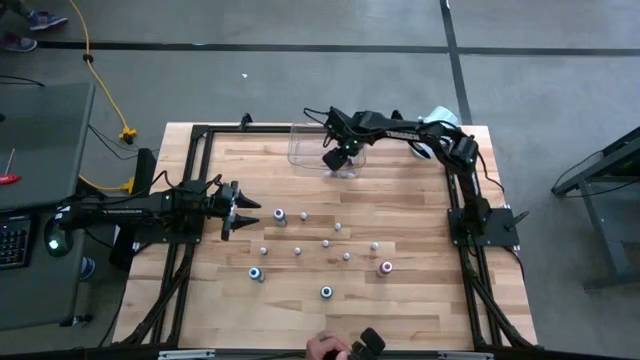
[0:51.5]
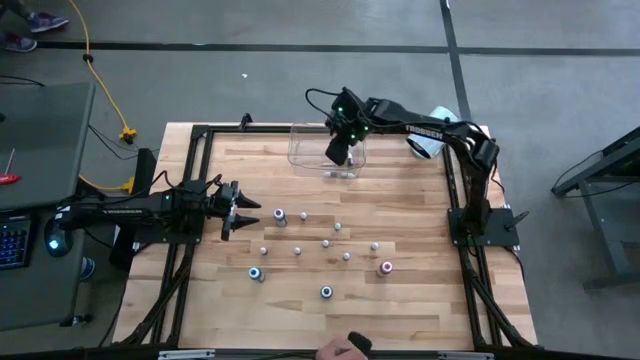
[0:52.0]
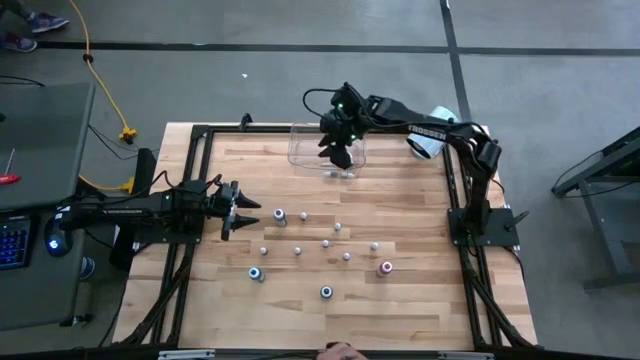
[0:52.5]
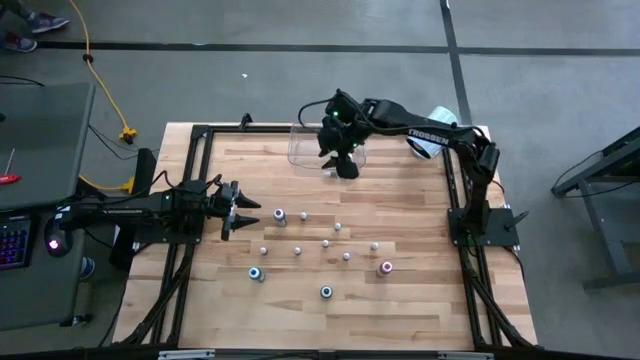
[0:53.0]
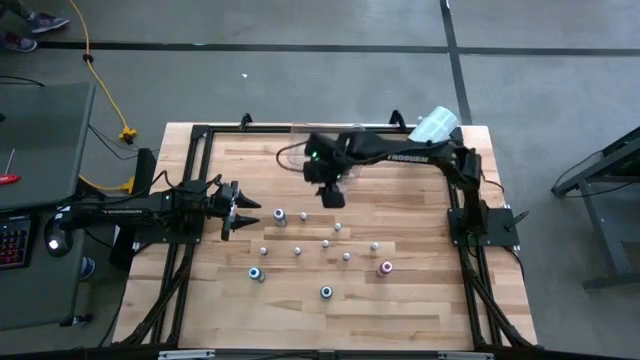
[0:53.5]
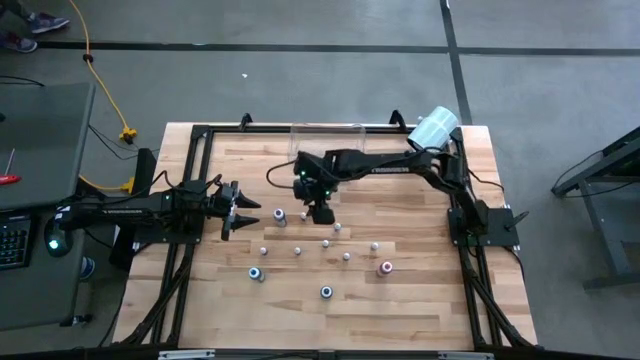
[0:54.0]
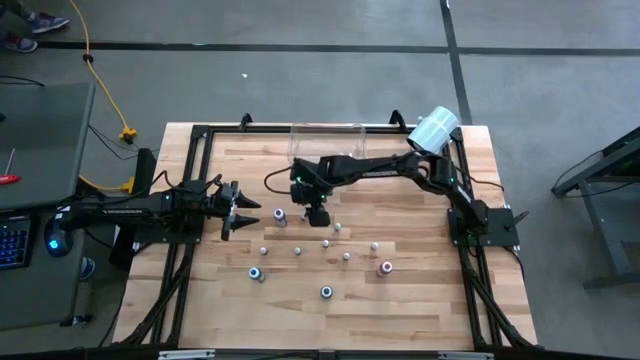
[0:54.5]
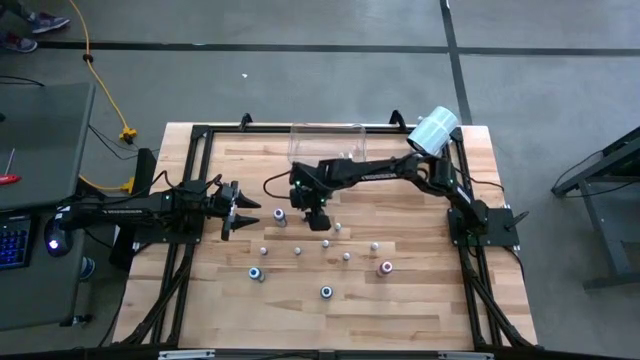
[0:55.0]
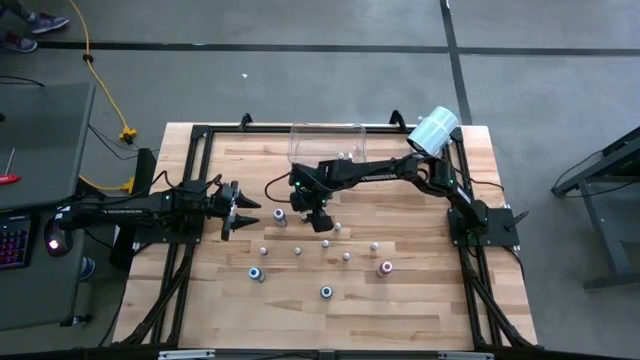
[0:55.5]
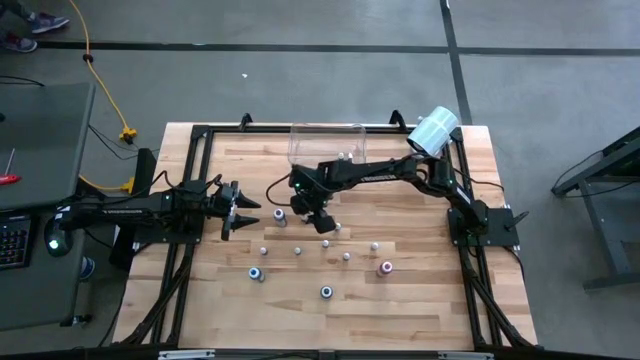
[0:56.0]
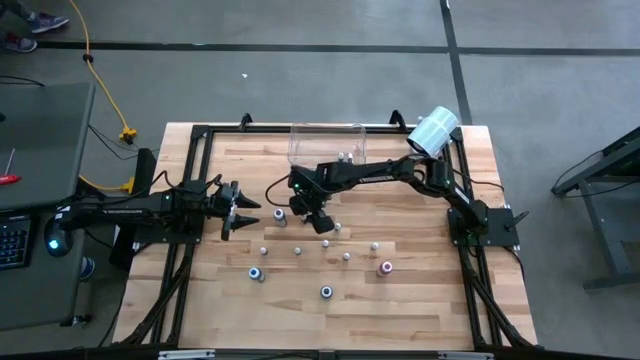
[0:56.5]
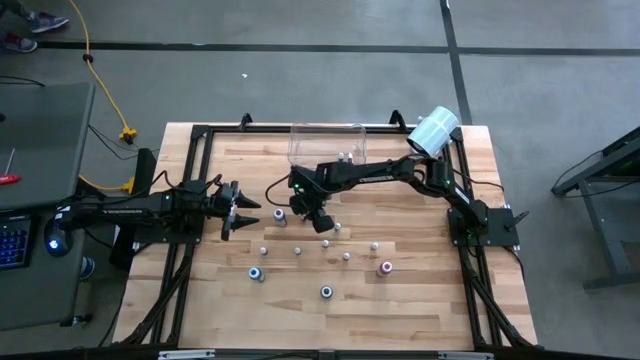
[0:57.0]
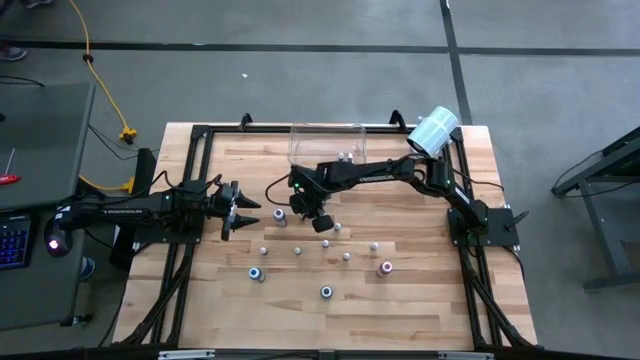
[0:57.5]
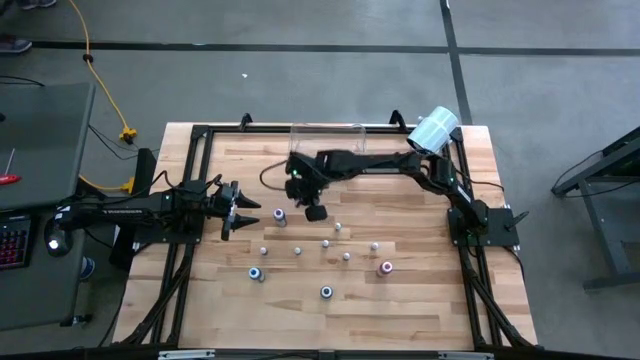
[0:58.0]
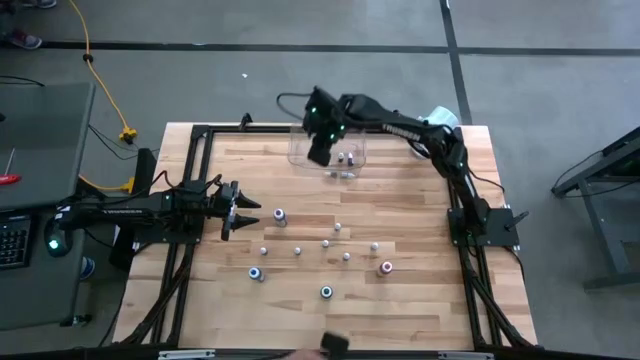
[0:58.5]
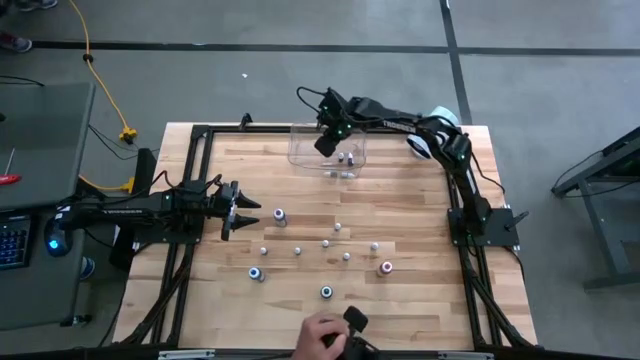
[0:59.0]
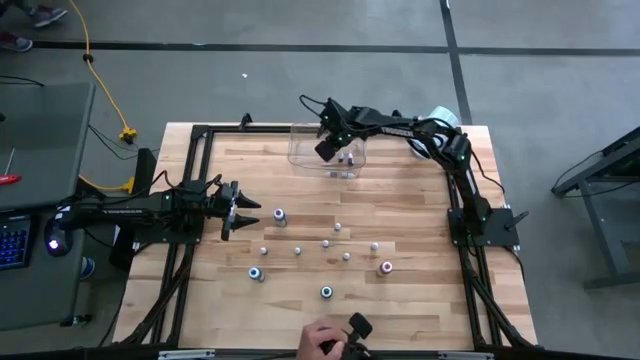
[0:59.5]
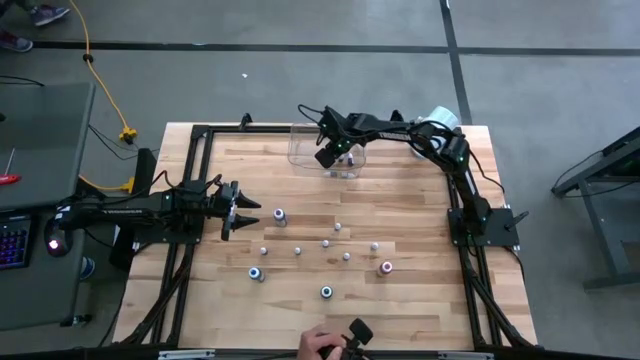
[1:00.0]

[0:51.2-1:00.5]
Task: Pick & Place food coloring
Put the small blue food coloring into the transparent container

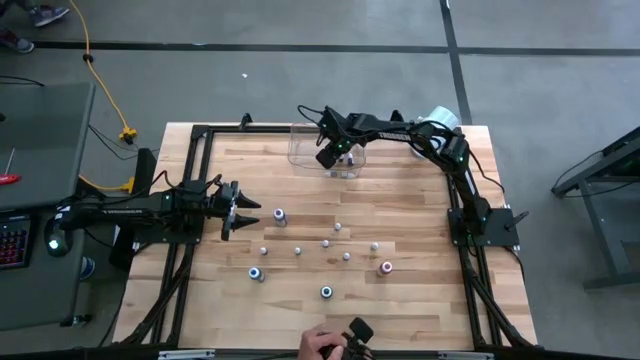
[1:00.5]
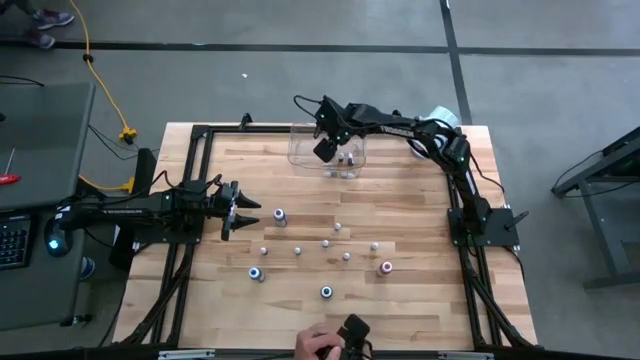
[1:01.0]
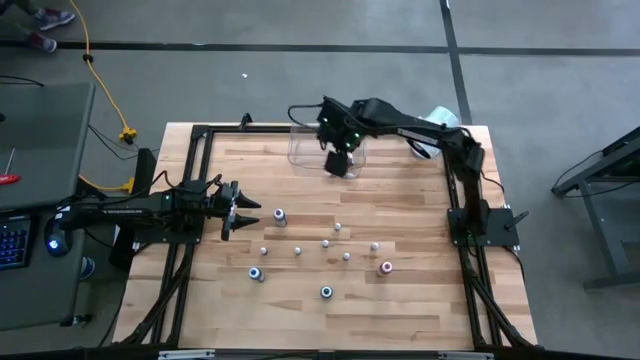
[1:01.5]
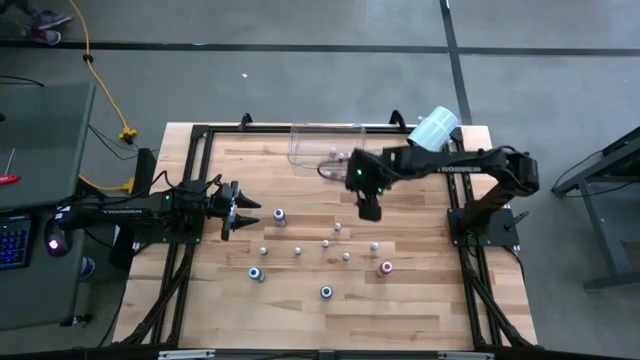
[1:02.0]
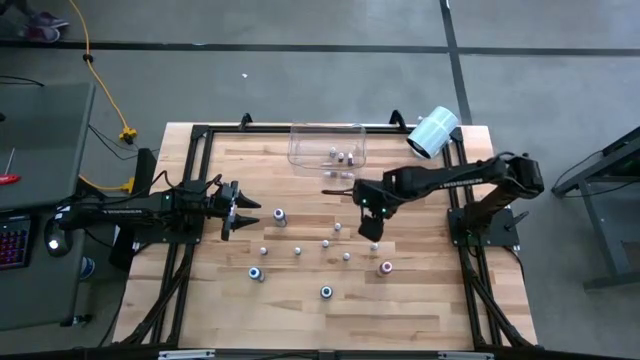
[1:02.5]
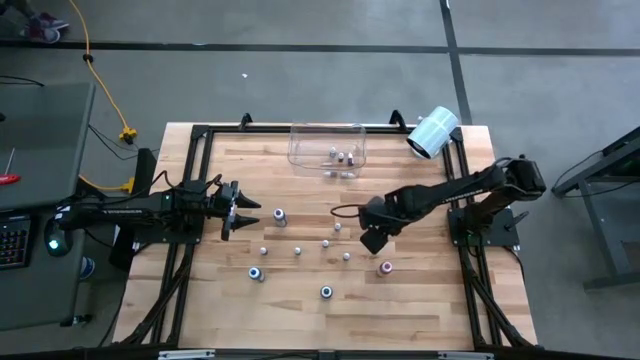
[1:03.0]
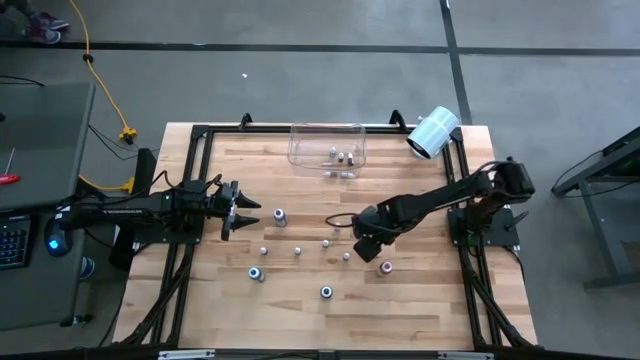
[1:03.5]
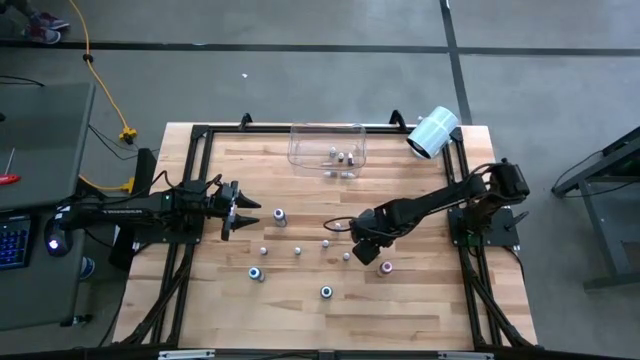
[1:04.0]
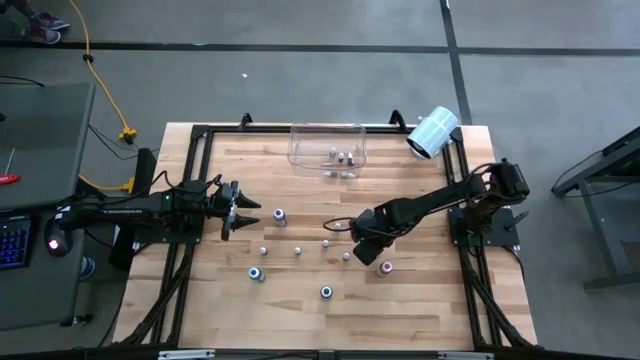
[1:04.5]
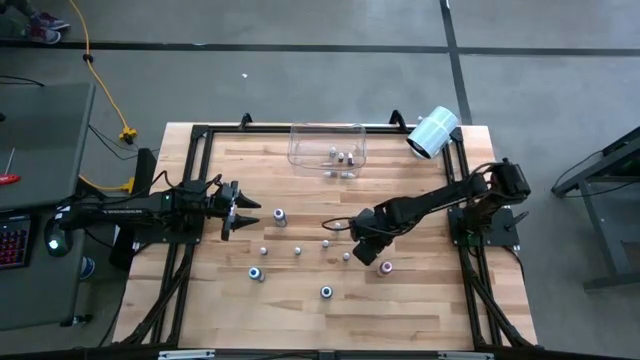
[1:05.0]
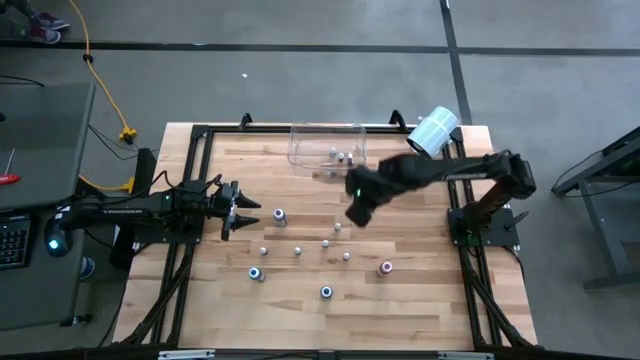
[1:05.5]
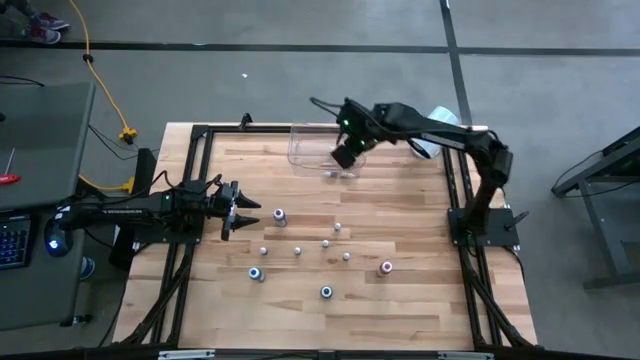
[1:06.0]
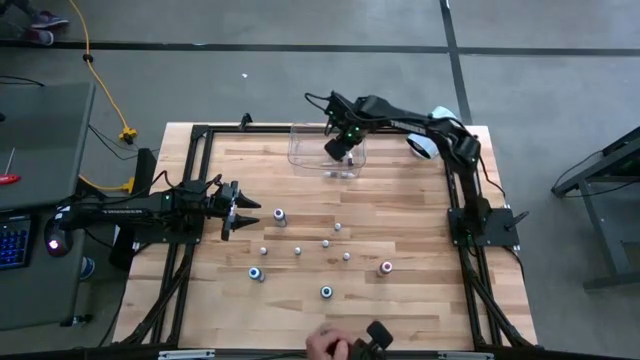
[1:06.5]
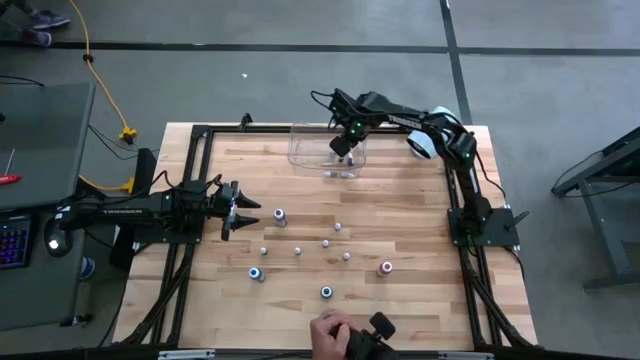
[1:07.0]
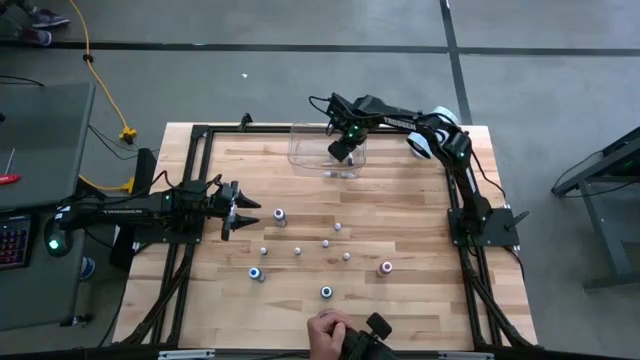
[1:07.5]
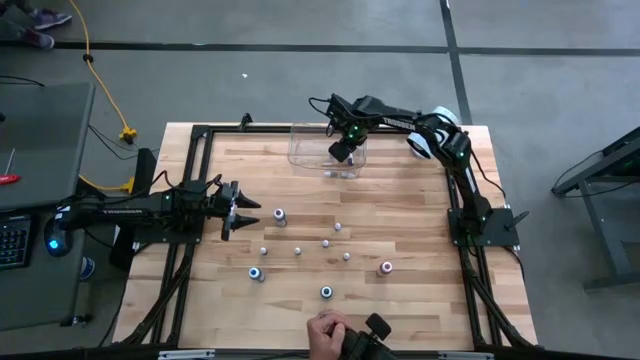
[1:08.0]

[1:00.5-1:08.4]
Put the small green food coloring into the transparent container

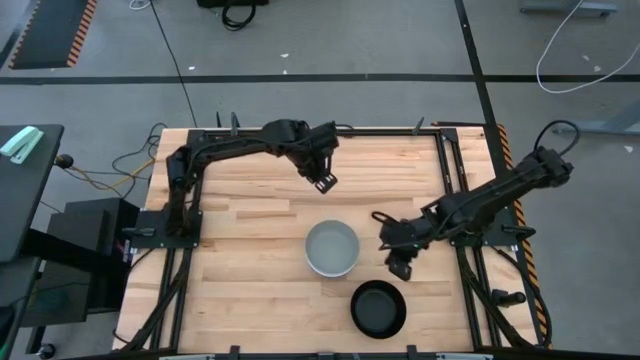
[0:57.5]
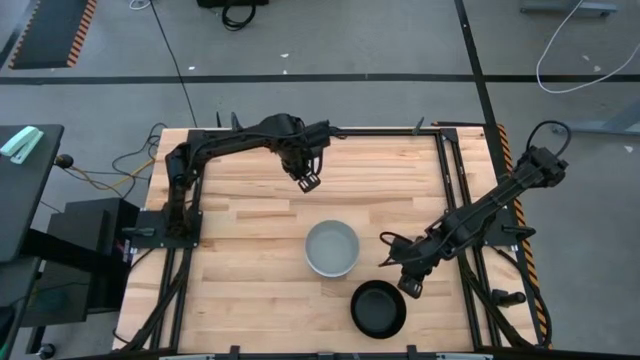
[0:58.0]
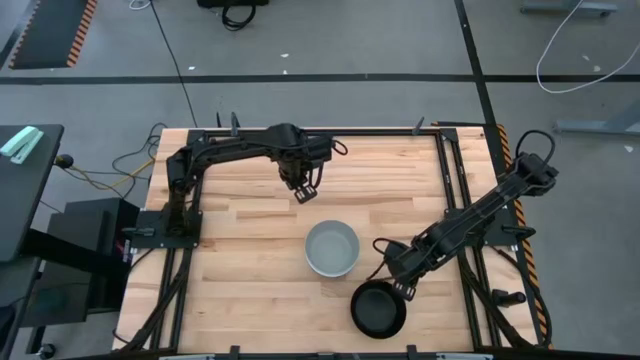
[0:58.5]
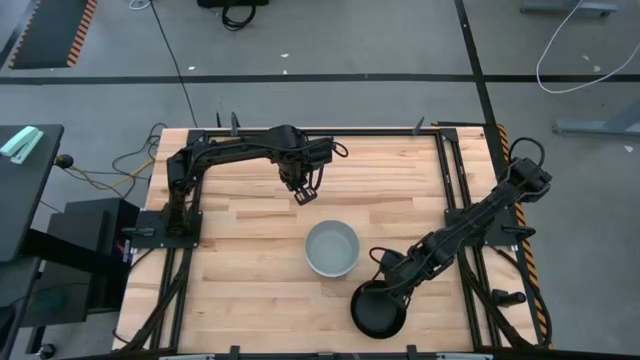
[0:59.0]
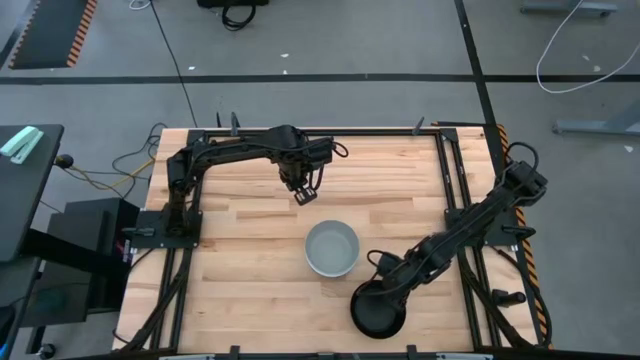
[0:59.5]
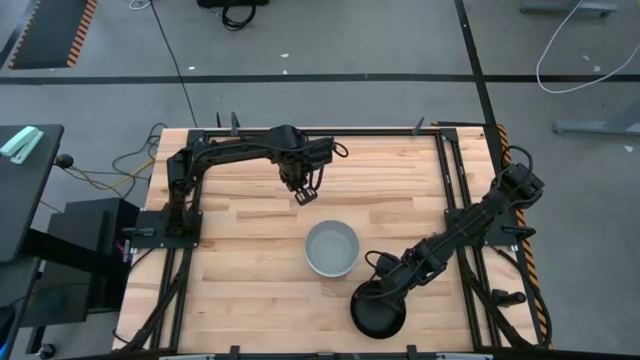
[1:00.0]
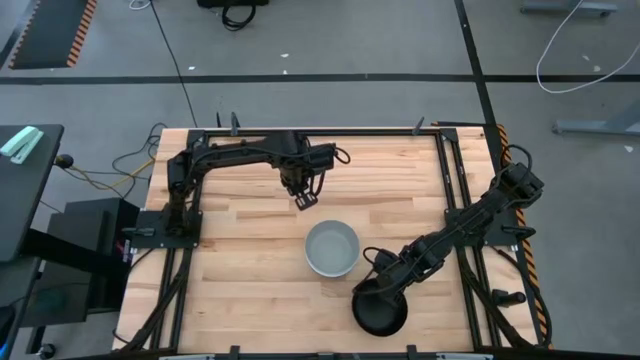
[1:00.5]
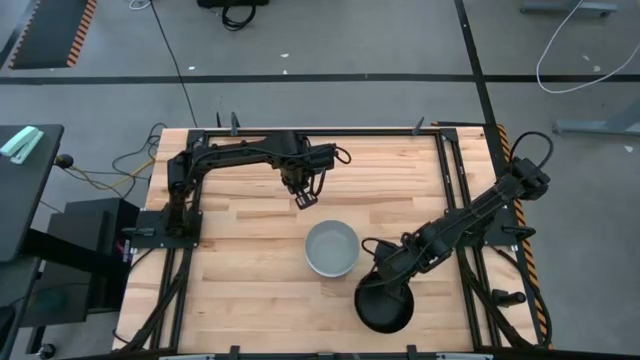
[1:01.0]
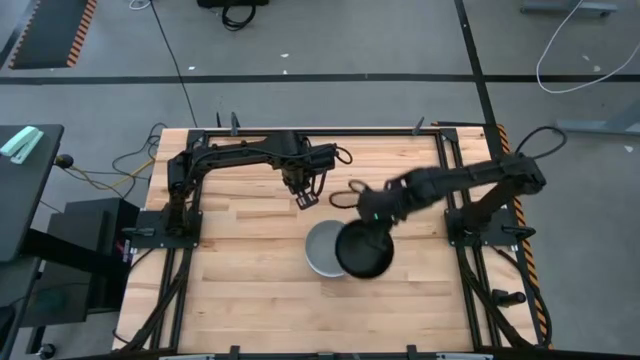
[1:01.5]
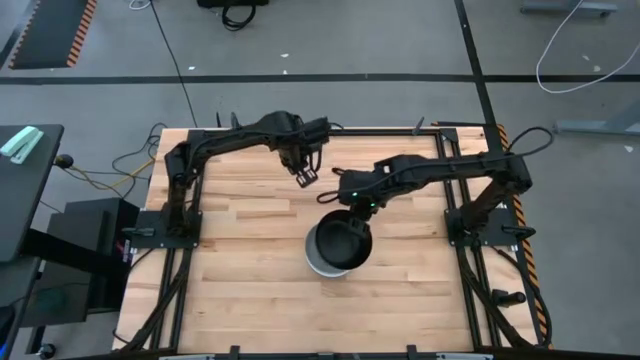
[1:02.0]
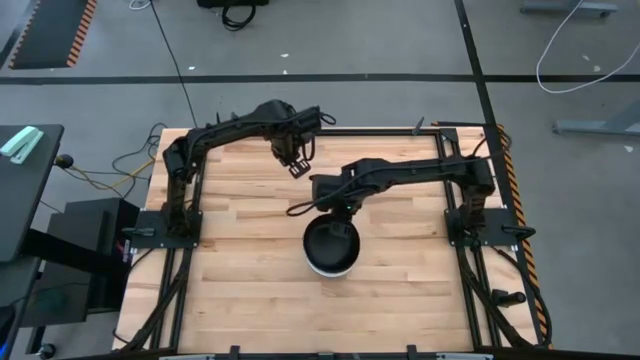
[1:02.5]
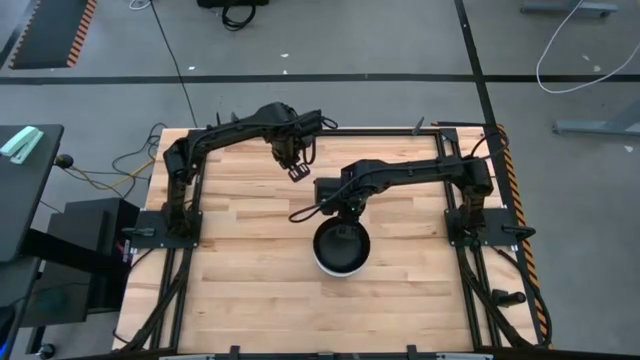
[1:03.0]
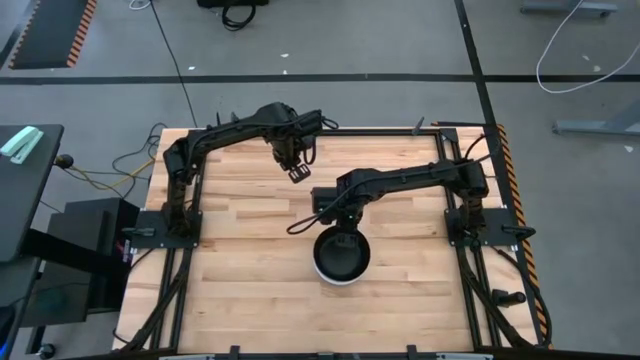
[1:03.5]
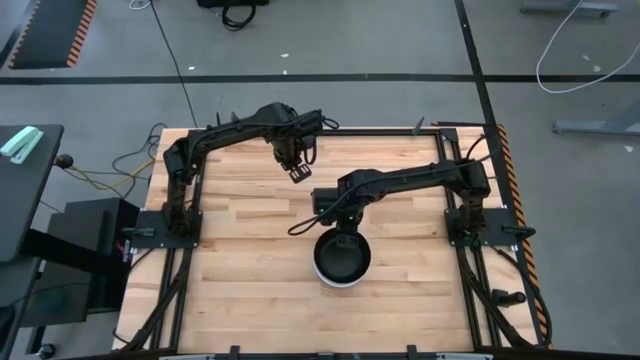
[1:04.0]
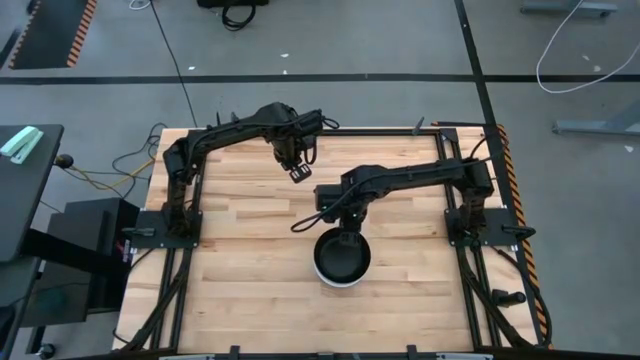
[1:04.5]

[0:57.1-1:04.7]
Task: Nest bowls inside each other
Stack the black bowl on the gray bowl
